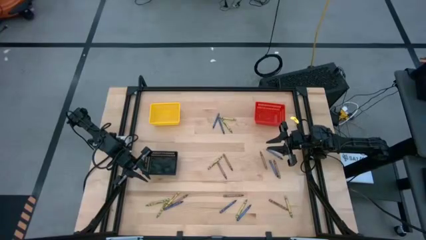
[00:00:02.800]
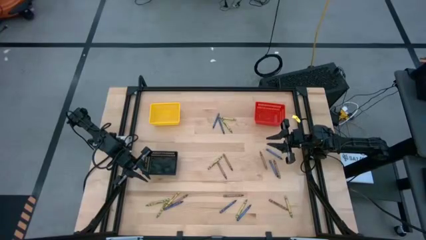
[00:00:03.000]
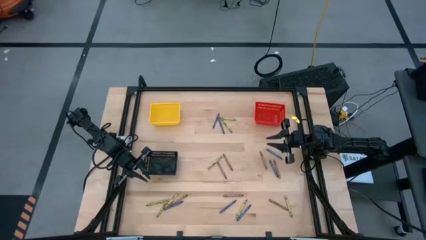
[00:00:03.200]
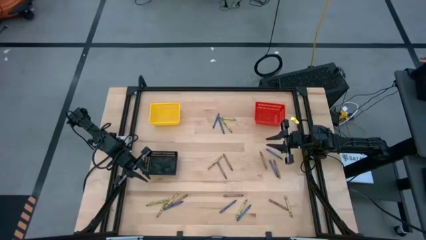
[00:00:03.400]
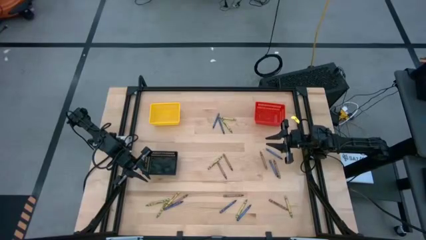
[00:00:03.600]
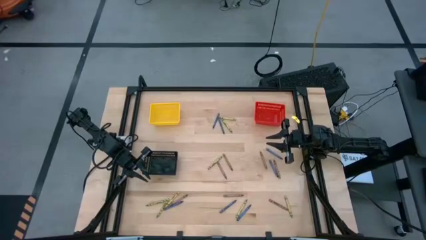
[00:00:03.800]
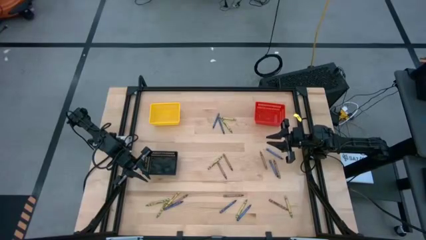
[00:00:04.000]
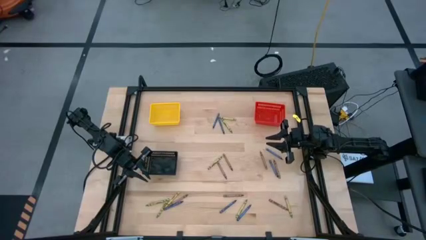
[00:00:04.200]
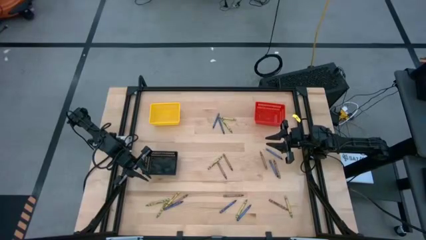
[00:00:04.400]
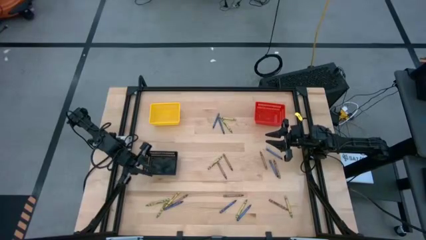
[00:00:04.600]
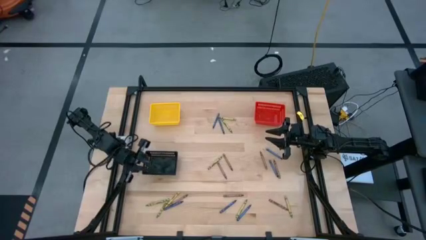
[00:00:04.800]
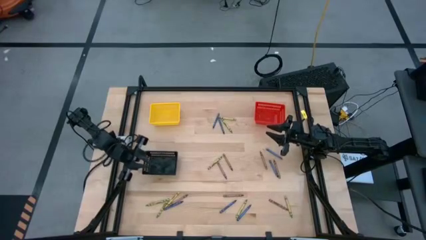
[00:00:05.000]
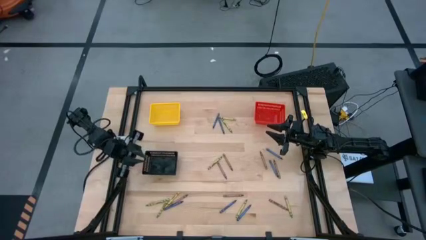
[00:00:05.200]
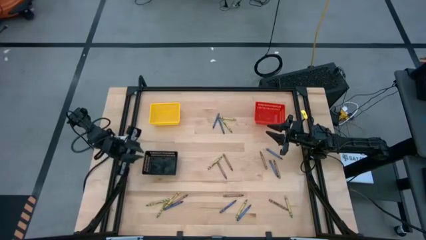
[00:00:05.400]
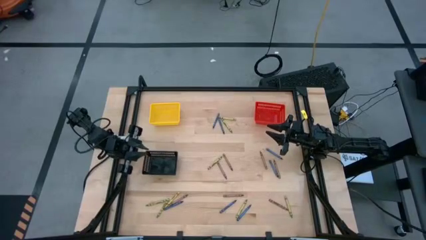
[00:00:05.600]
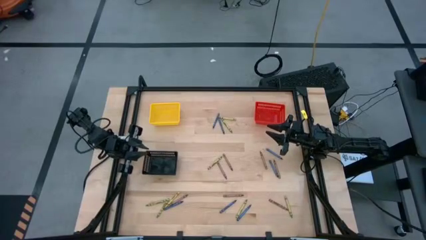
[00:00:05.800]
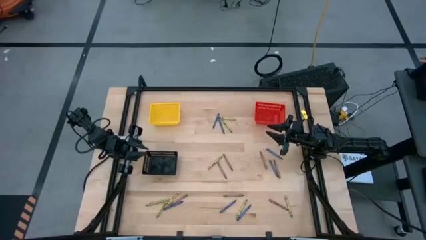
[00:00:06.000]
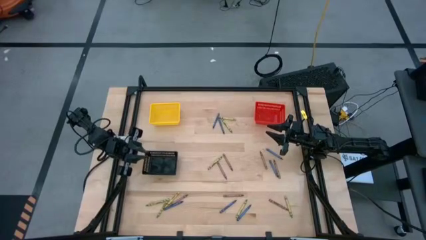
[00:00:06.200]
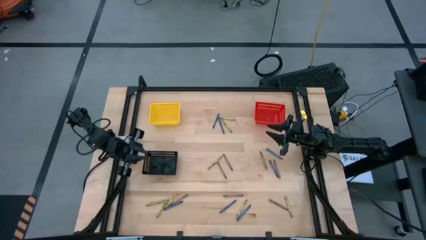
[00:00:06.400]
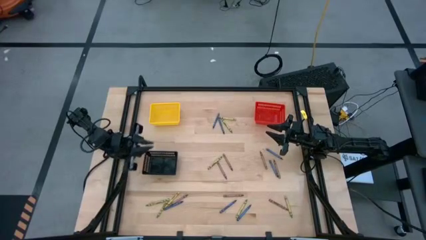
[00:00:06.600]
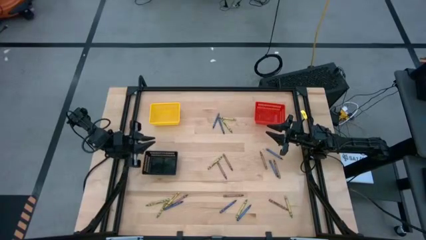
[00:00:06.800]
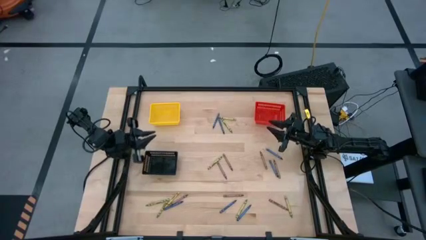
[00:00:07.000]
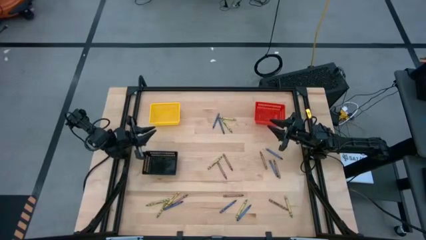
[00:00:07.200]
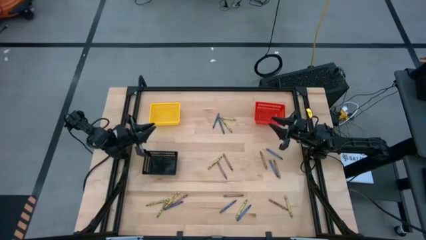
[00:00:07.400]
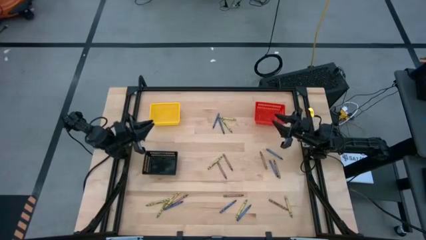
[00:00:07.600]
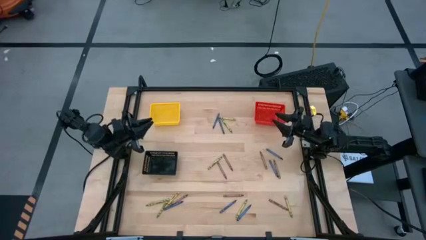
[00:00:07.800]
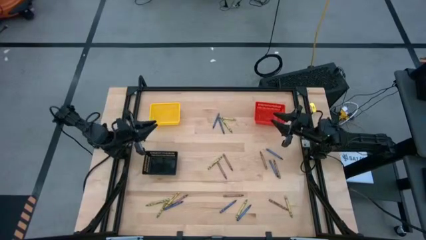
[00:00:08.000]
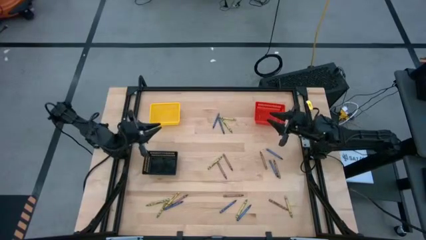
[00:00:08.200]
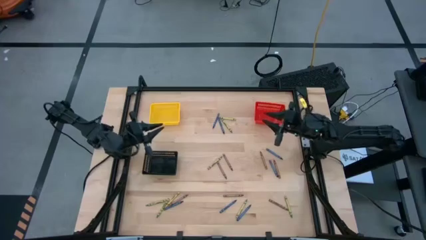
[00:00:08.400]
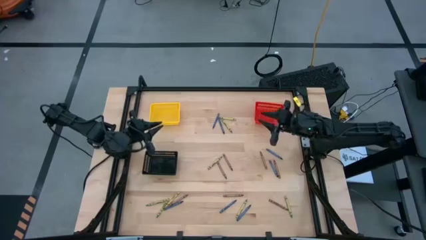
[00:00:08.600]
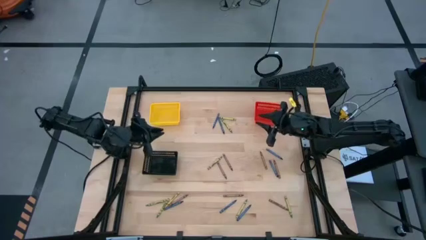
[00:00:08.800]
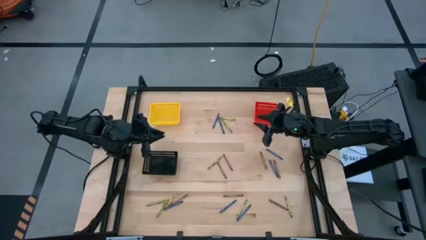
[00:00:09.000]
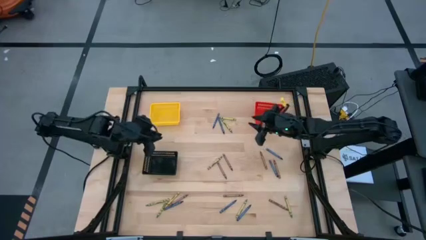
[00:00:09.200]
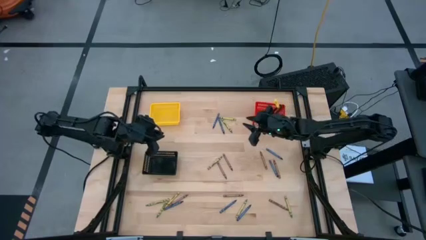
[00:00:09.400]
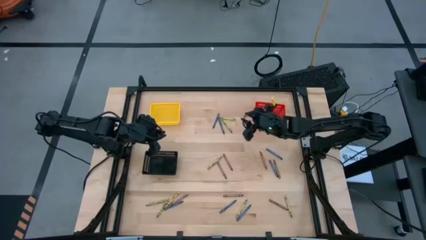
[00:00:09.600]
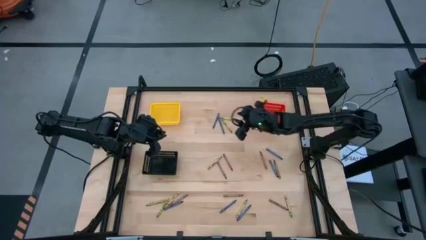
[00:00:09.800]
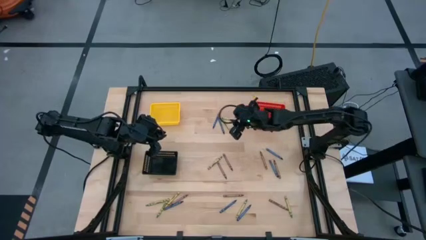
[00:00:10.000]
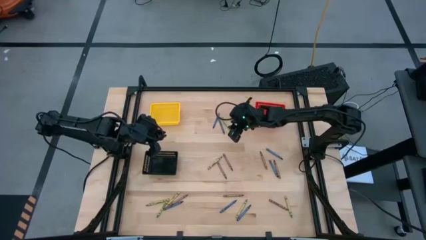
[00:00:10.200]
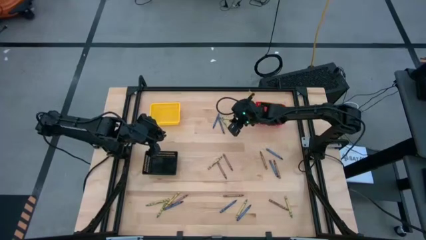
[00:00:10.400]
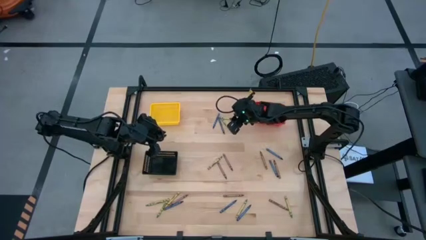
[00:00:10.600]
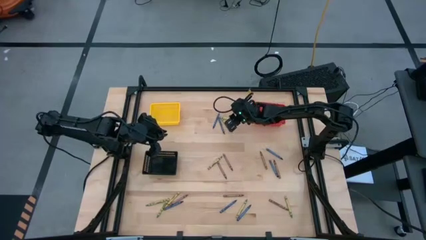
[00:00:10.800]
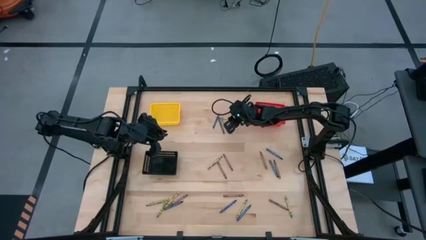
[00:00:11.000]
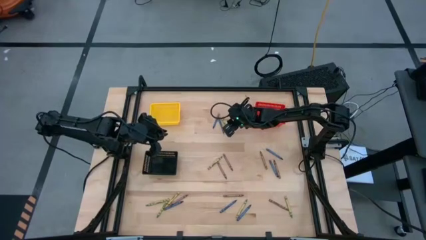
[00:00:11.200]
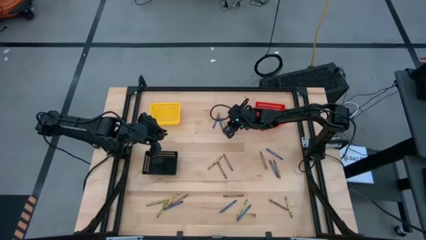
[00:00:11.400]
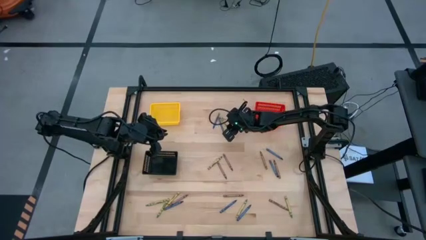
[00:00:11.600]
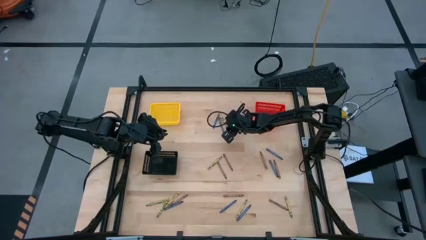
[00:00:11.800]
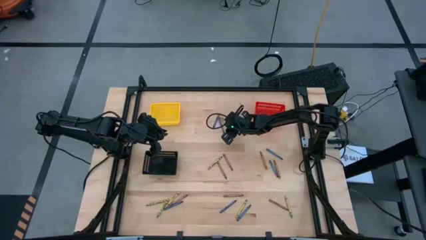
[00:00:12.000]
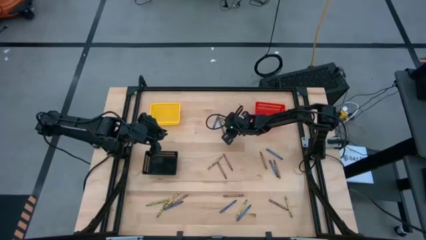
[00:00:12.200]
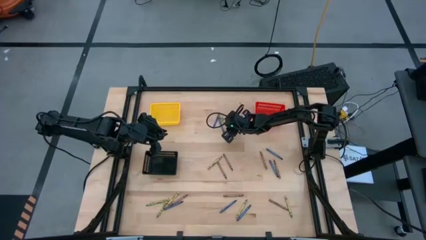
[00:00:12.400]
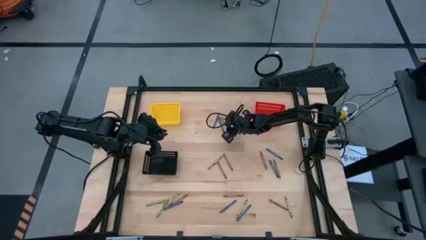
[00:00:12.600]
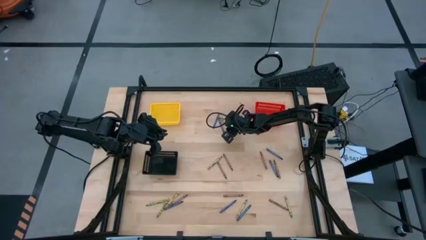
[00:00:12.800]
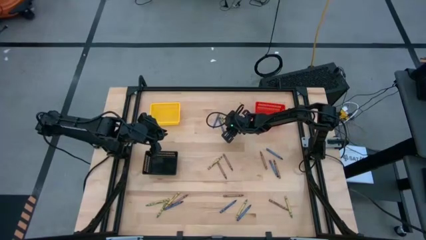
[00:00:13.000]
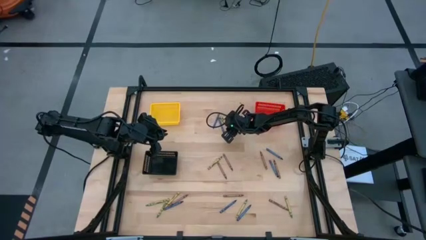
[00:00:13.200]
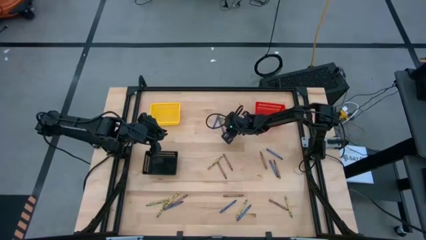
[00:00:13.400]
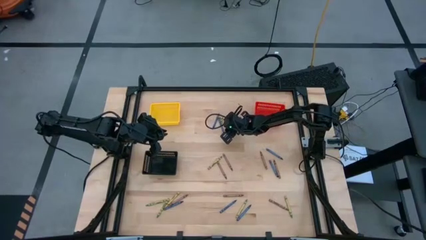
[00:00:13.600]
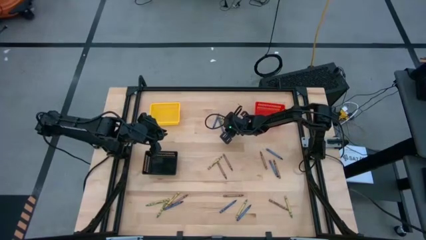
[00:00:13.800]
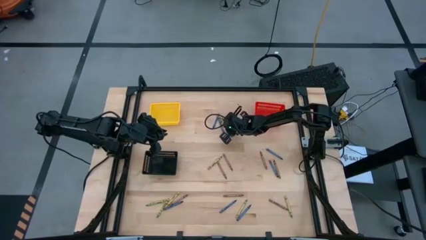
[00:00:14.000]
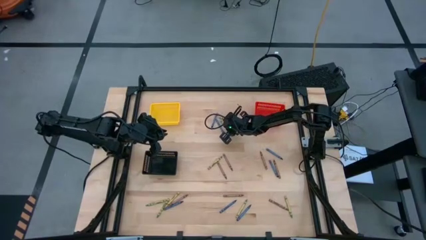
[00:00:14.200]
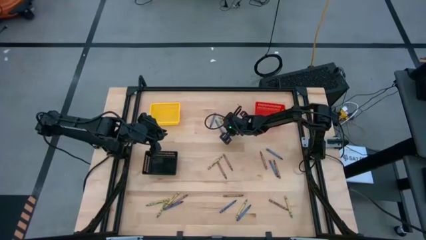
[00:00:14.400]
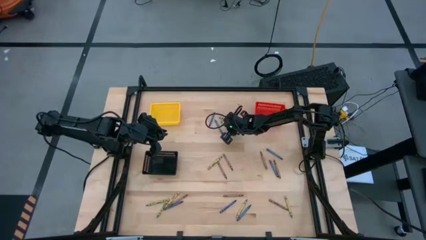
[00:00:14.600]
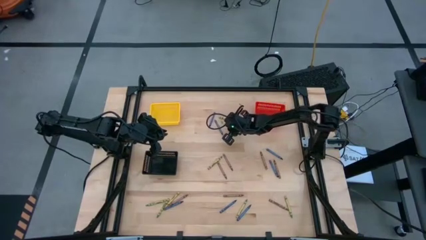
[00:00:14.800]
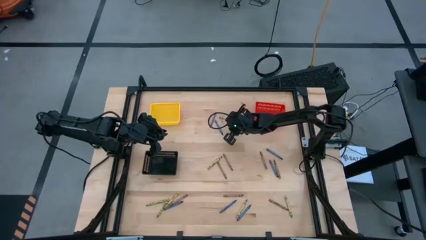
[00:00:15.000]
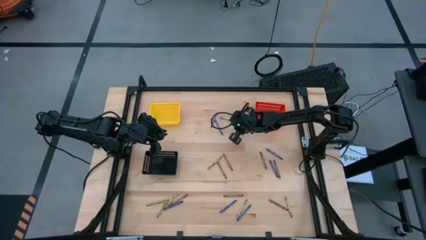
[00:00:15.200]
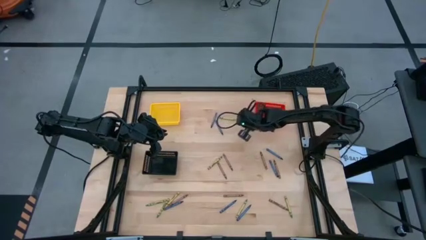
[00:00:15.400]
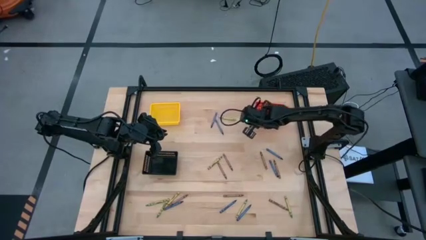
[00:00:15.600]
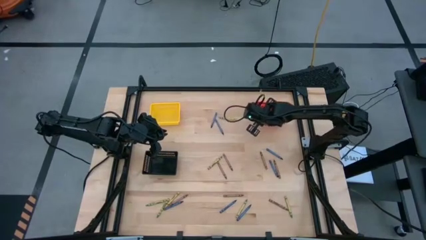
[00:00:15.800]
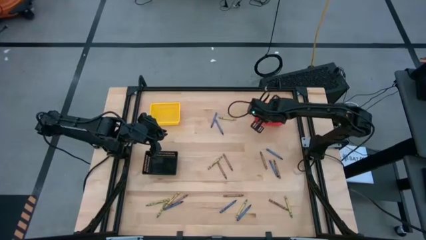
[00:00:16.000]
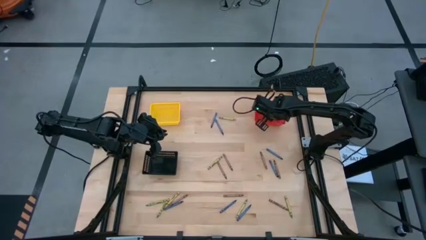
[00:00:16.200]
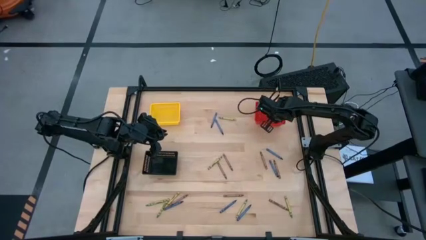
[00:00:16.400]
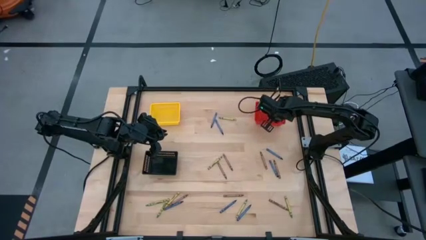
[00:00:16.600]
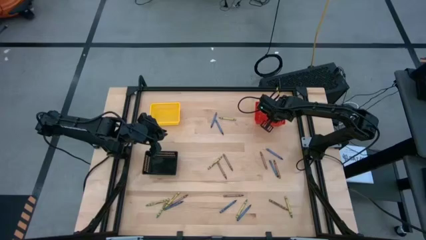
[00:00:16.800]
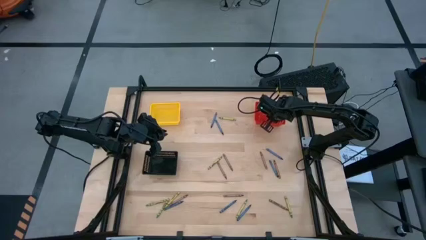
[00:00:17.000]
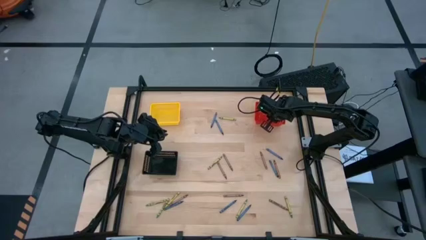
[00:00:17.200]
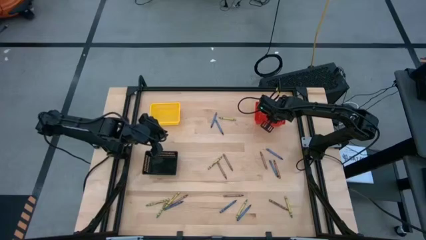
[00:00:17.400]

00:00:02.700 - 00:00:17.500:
Task: Sort crayons
Put the green crayon into the red bin
